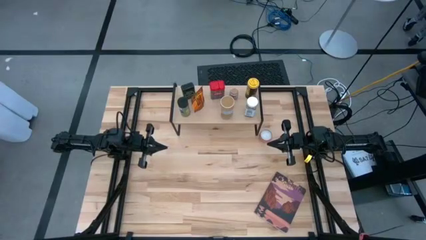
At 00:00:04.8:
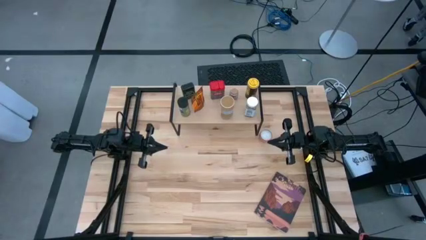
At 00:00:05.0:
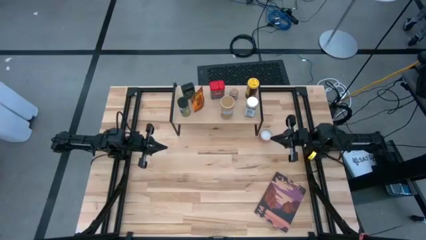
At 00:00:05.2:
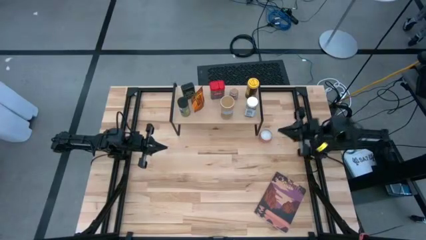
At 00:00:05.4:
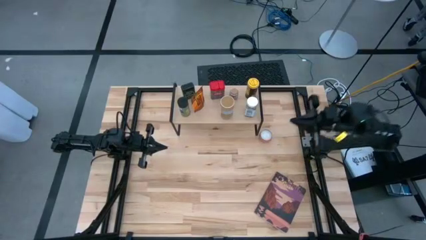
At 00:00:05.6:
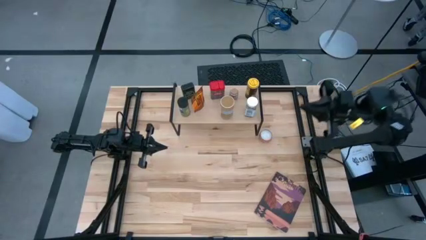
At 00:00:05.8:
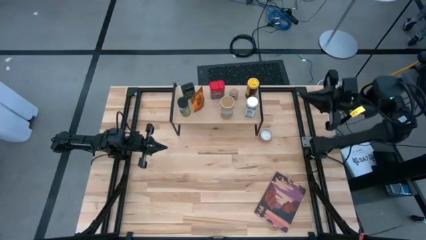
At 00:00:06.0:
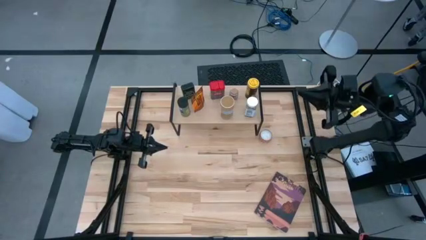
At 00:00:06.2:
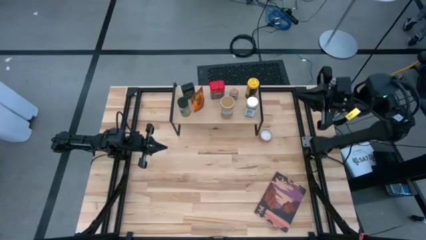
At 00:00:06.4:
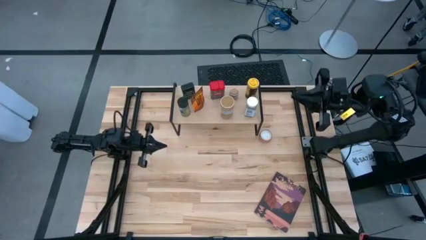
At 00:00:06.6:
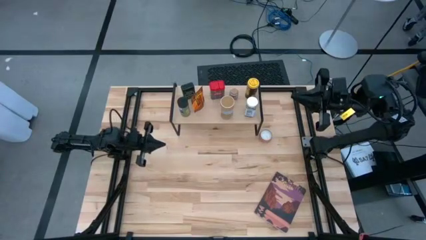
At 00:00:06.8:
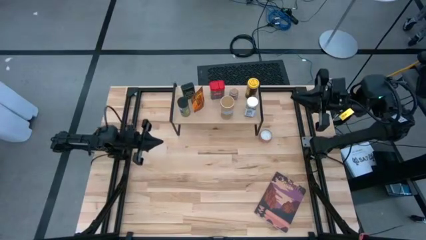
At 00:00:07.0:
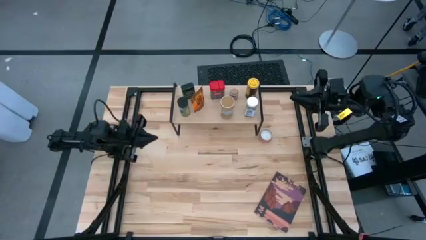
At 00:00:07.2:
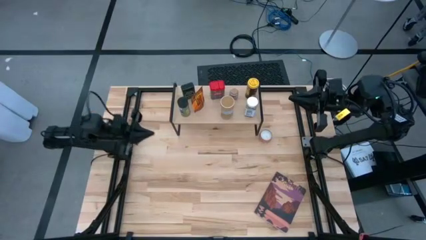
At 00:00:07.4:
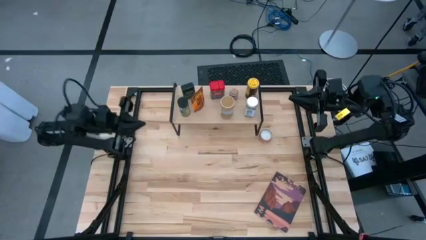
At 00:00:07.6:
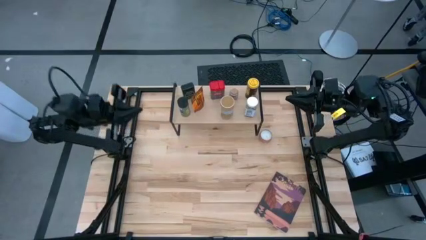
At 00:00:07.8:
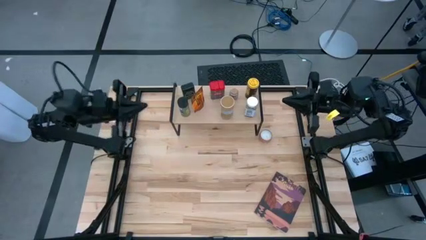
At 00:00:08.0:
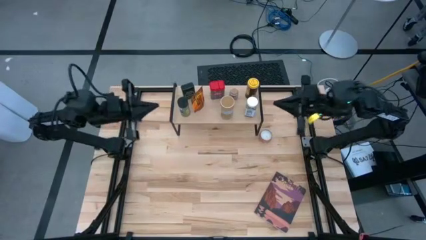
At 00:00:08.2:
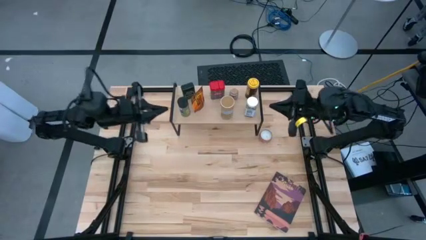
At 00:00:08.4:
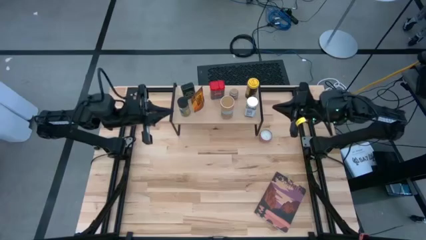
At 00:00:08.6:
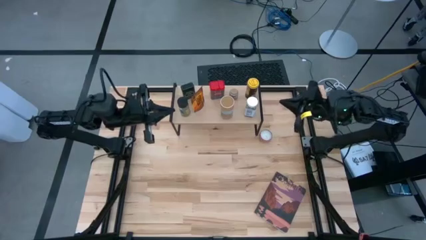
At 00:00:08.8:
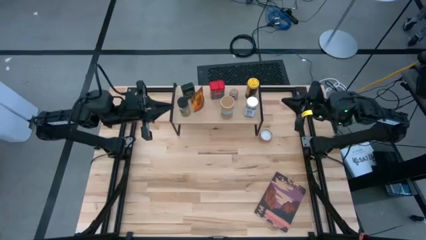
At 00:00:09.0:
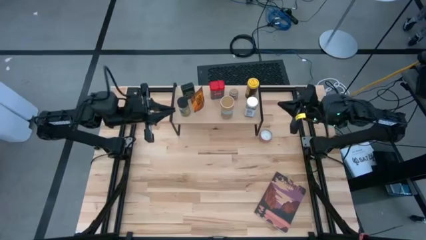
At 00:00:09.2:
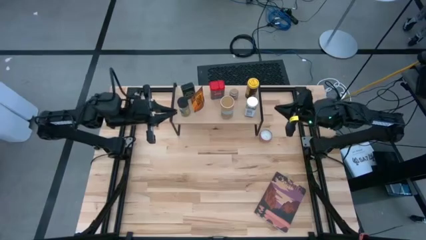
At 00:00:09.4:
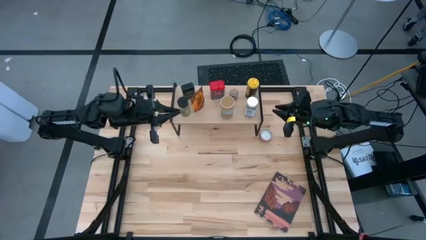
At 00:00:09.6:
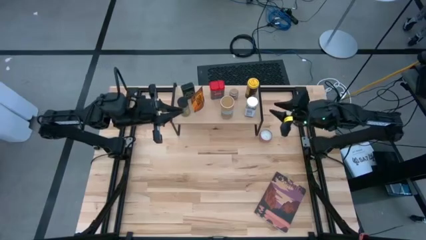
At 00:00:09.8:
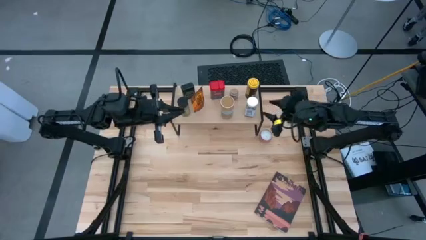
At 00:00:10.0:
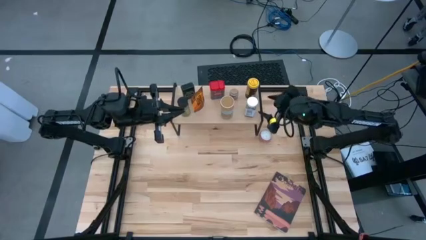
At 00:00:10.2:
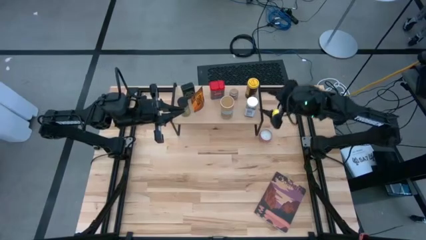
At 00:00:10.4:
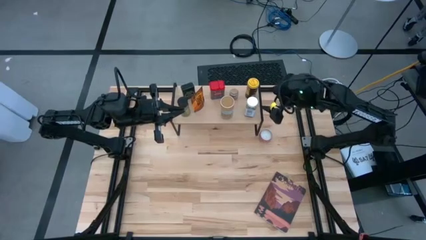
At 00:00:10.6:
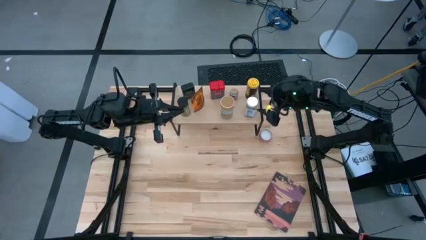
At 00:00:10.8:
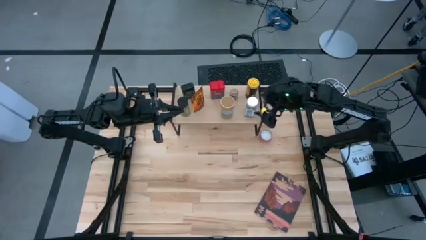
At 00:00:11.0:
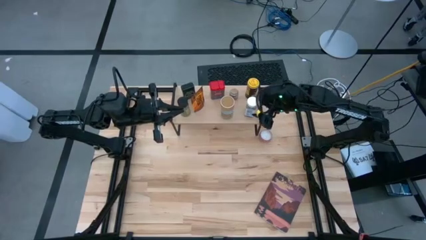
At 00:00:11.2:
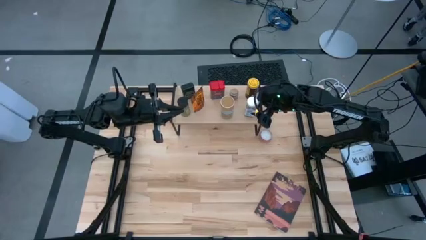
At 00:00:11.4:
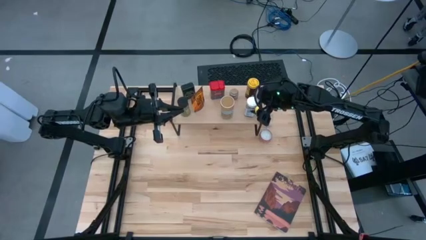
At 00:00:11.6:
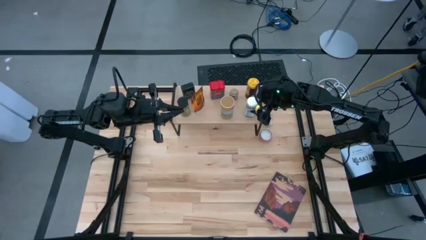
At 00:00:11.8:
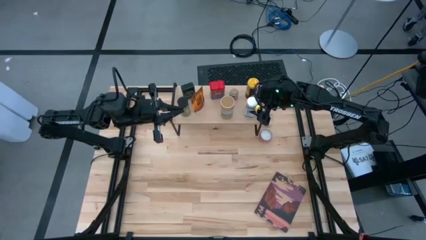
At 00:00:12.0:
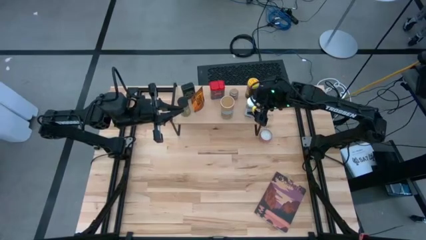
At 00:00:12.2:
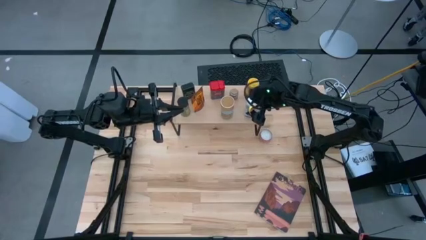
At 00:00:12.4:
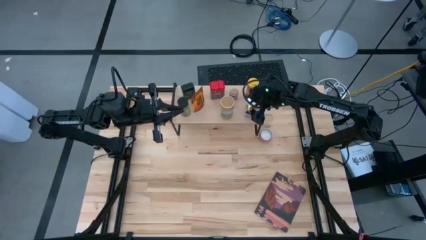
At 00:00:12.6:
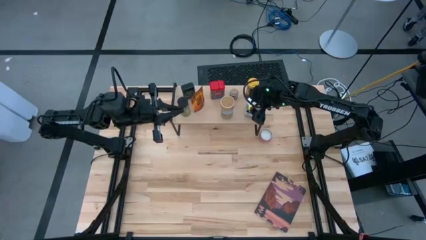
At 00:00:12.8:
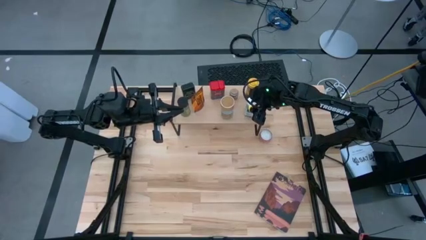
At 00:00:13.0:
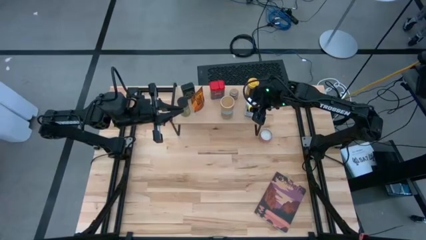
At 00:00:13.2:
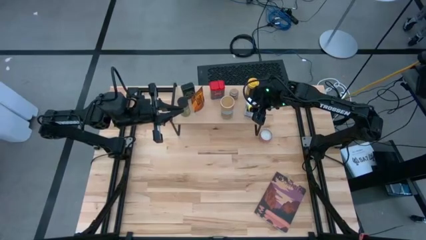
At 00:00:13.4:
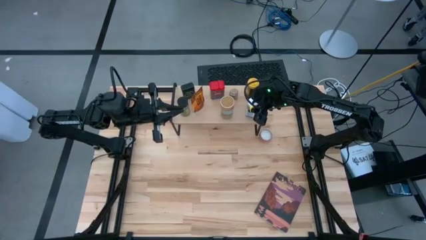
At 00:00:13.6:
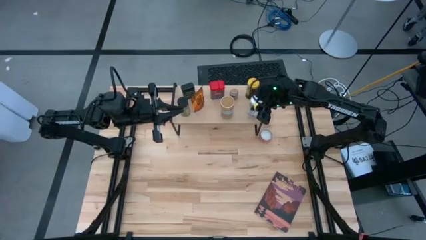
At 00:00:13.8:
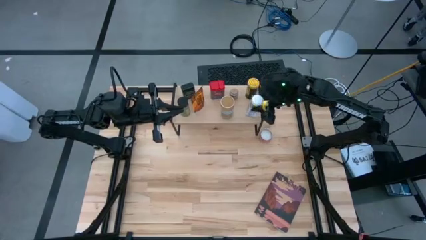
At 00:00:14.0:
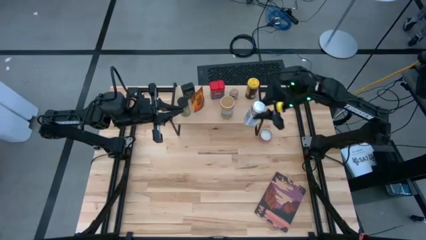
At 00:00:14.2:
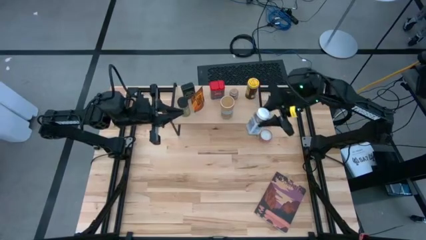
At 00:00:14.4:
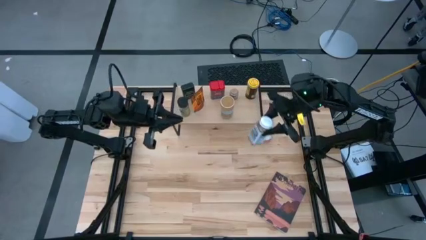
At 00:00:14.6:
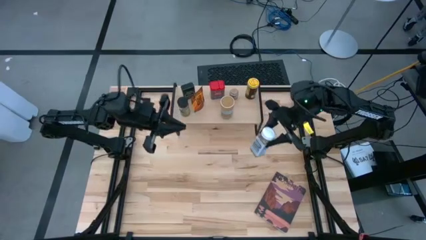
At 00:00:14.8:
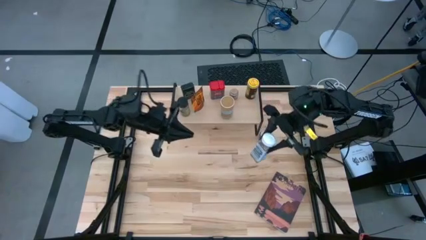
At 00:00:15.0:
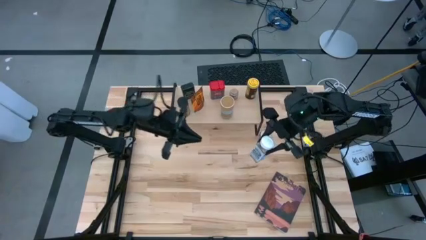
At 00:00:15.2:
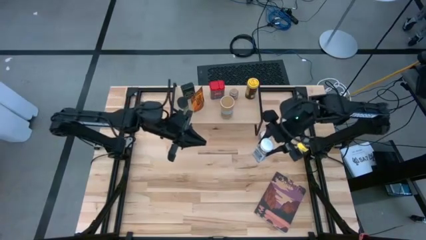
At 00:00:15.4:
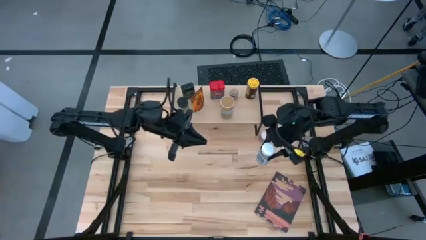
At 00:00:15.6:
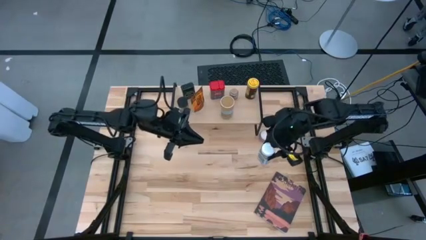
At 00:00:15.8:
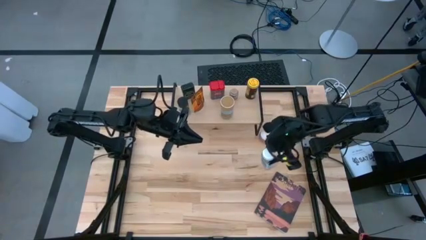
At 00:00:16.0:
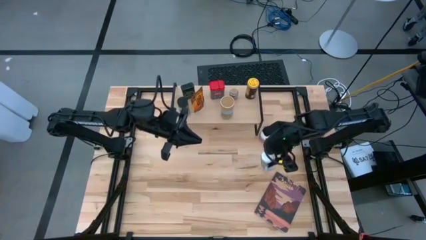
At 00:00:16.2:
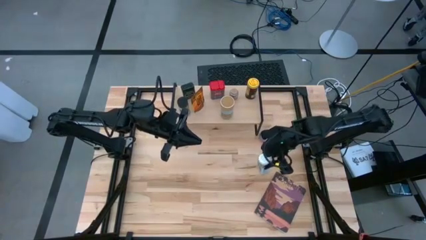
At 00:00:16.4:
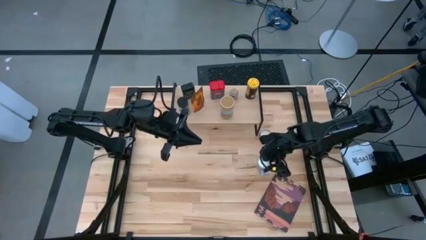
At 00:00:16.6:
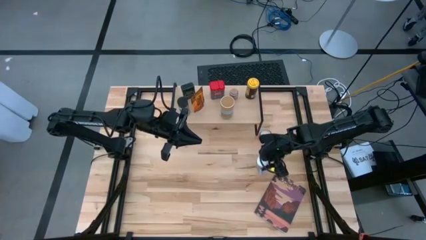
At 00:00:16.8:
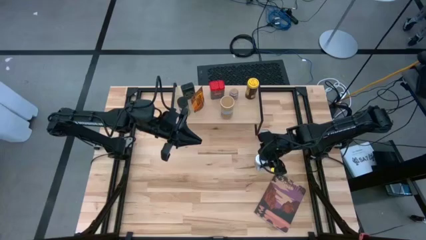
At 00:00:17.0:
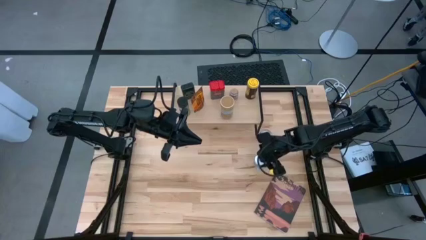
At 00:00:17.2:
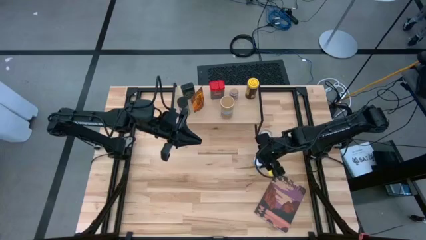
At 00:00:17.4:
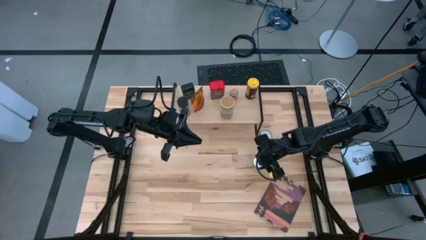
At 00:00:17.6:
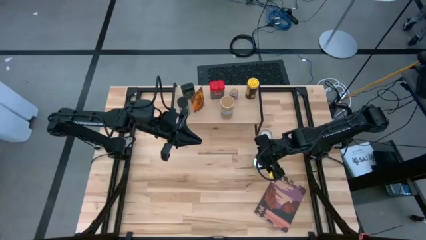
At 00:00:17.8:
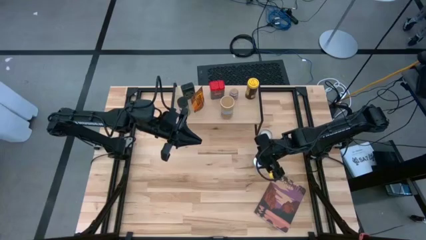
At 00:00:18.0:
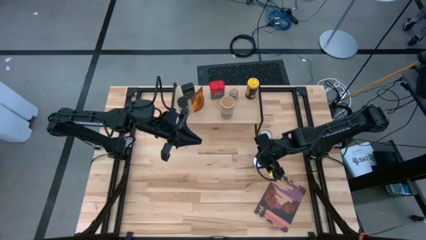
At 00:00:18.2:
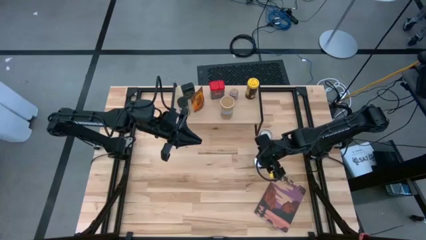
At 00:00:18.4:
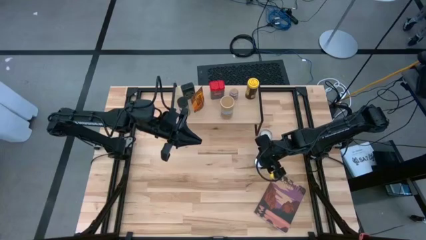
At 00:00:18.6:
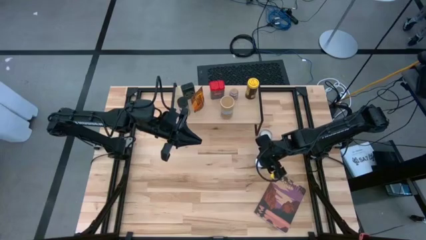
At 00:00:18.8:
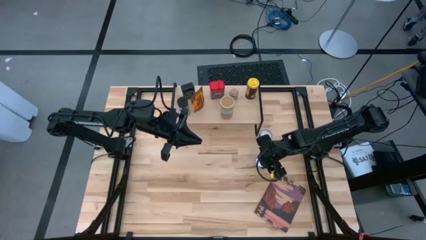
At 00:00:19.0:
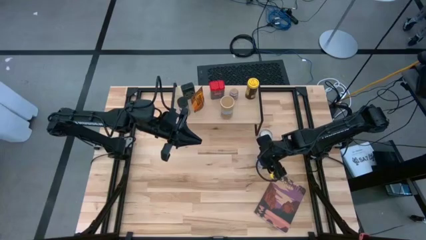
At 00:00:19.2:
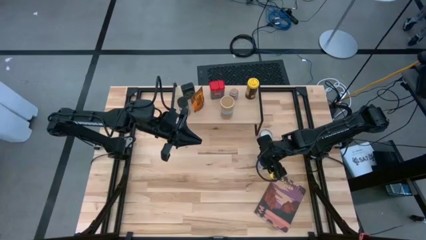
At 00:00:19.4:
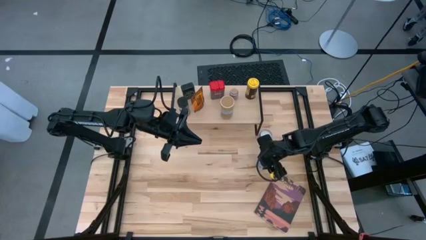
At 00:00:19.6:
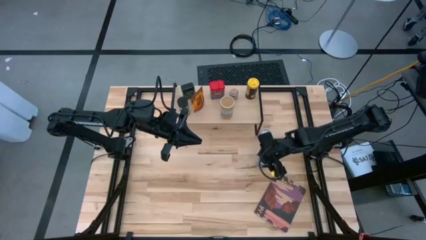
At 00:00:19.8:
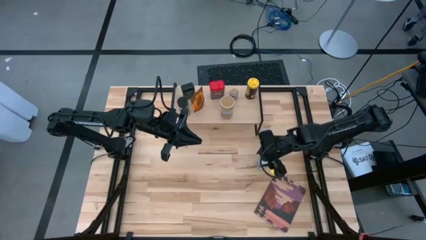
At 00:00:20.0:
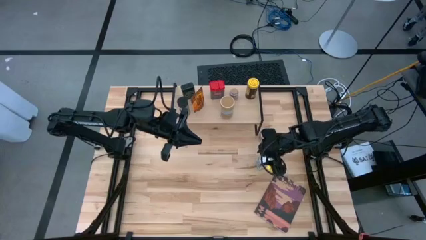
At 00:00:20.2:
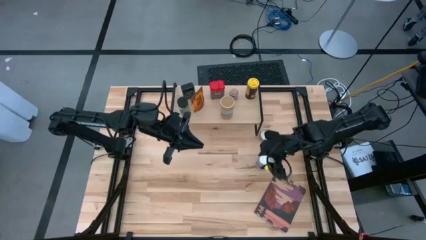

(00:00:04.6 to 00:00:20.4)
Task: Shelf spices
Put the white spice bottle on the table
